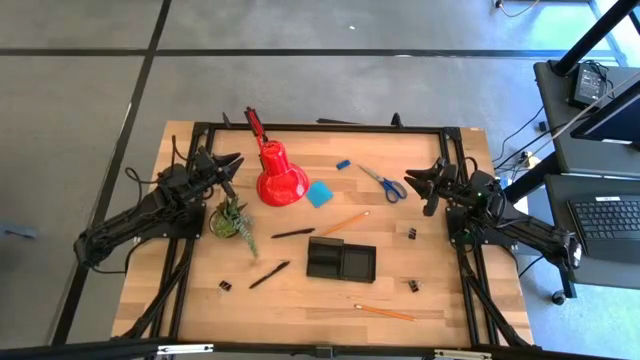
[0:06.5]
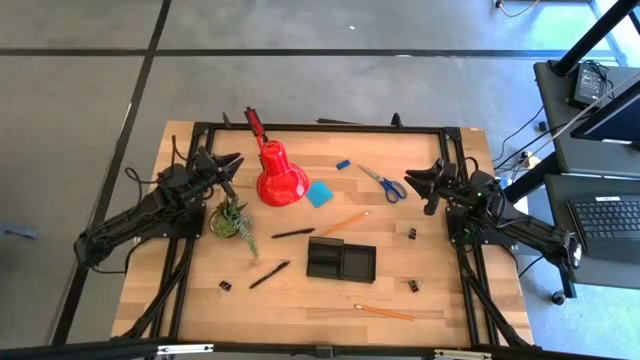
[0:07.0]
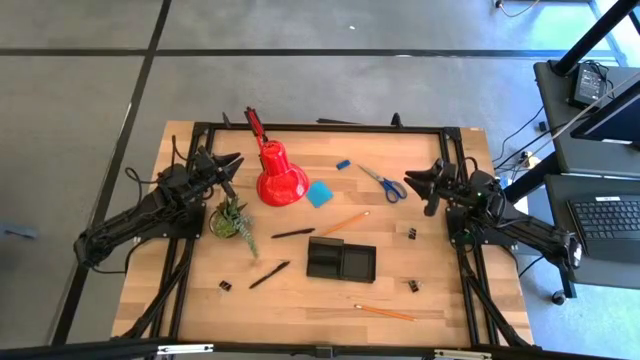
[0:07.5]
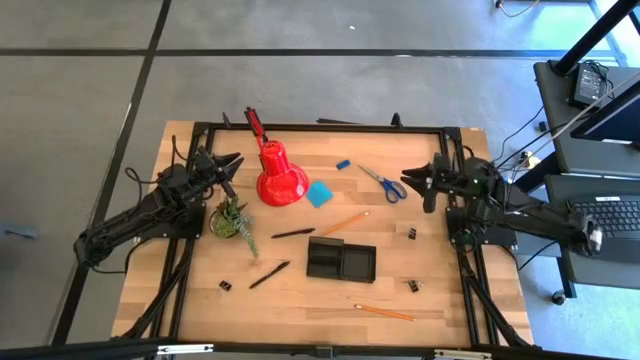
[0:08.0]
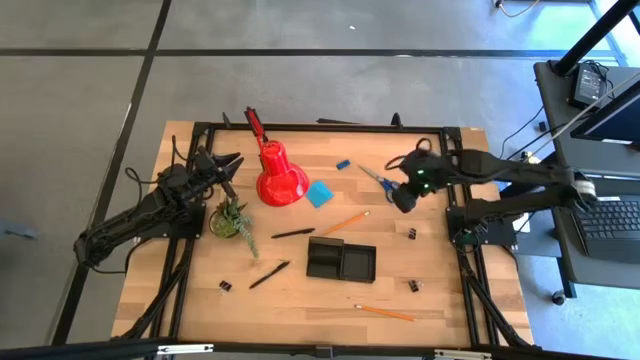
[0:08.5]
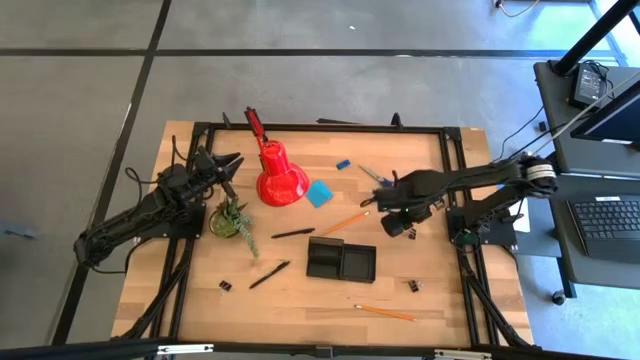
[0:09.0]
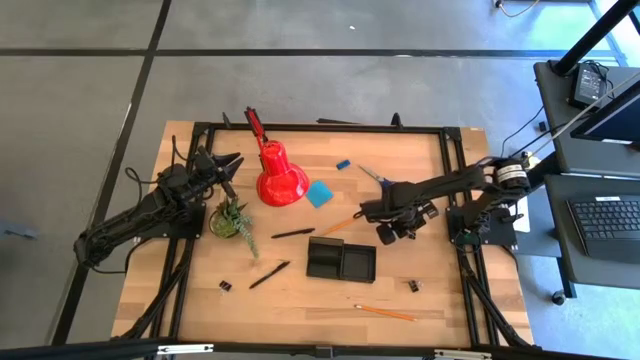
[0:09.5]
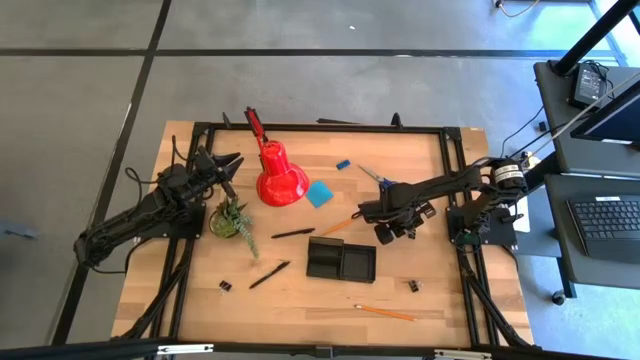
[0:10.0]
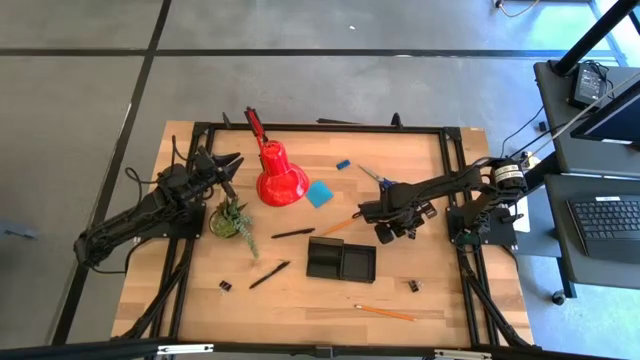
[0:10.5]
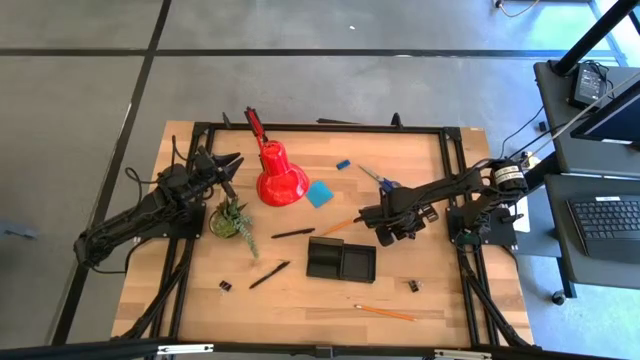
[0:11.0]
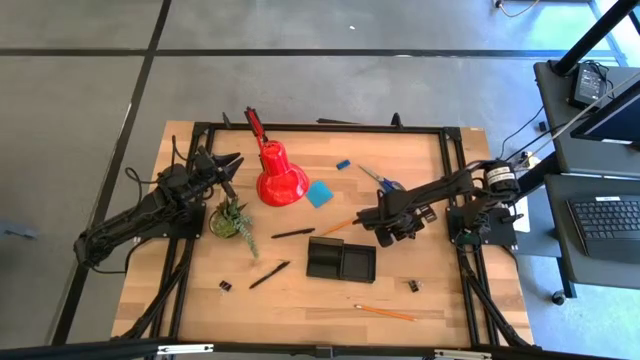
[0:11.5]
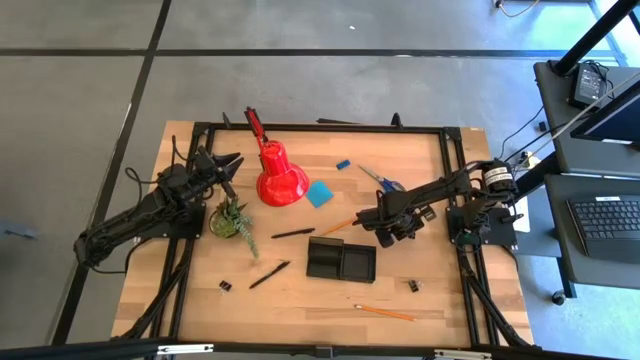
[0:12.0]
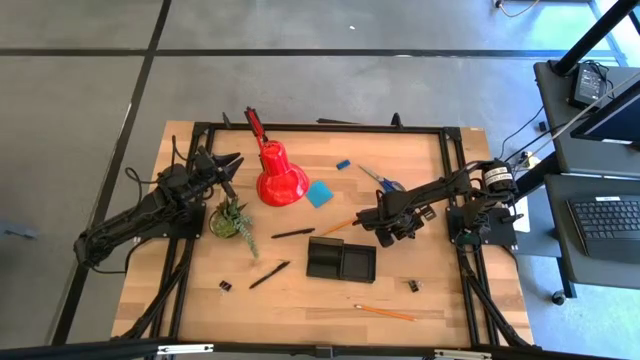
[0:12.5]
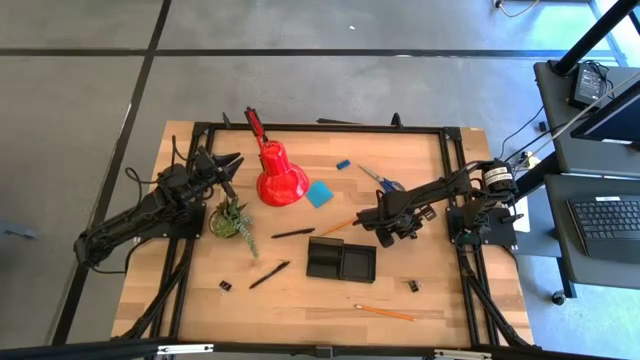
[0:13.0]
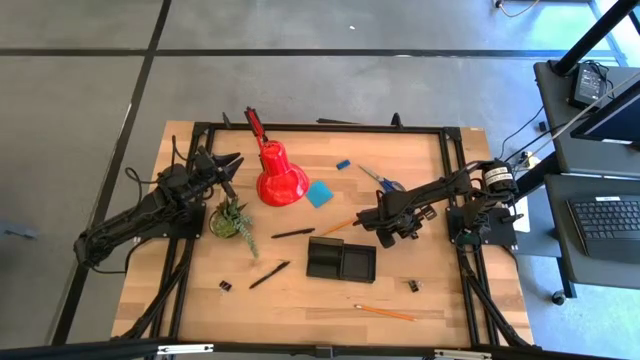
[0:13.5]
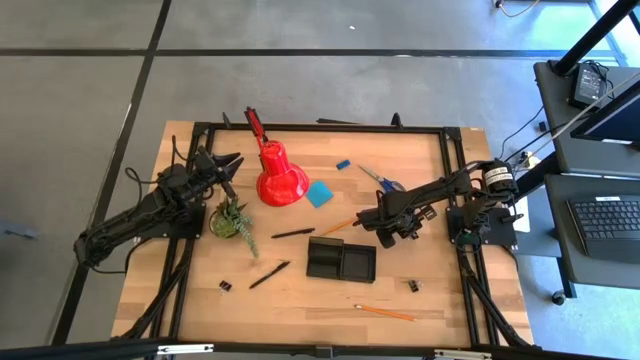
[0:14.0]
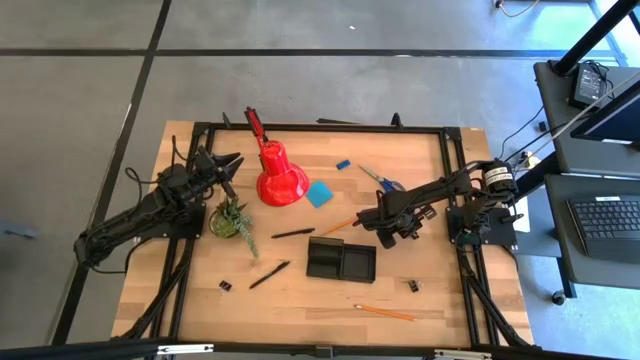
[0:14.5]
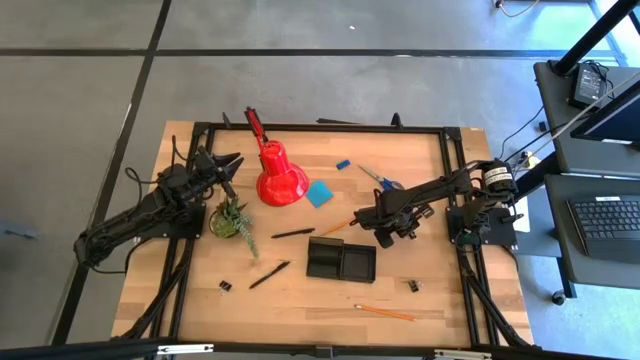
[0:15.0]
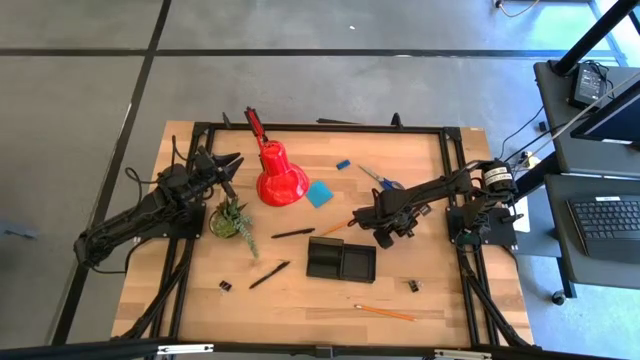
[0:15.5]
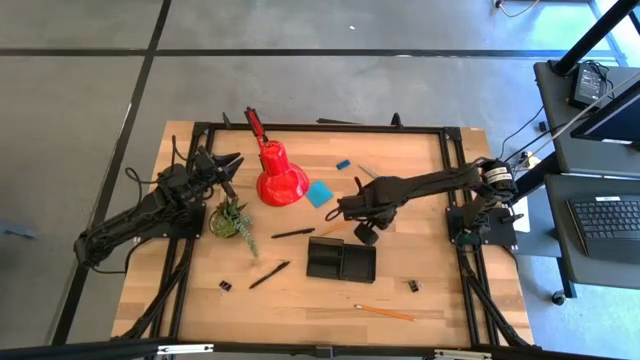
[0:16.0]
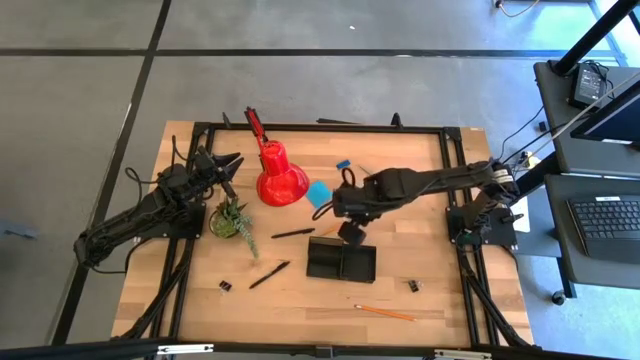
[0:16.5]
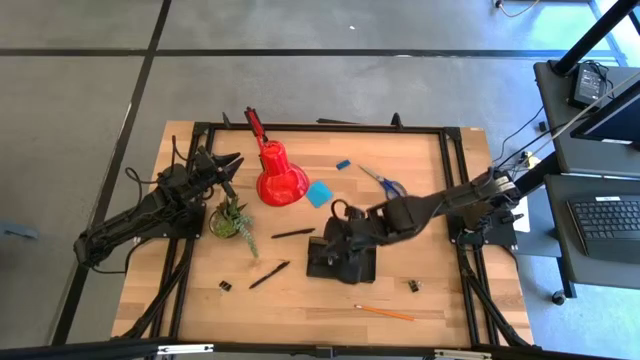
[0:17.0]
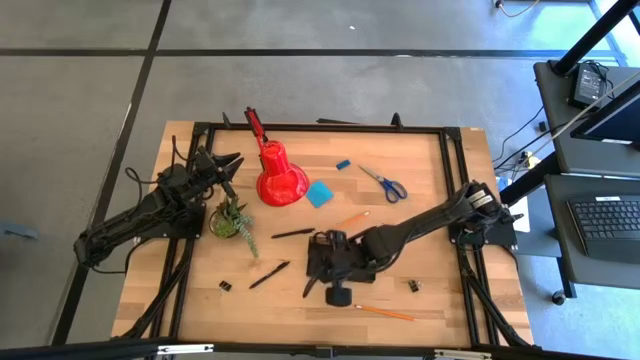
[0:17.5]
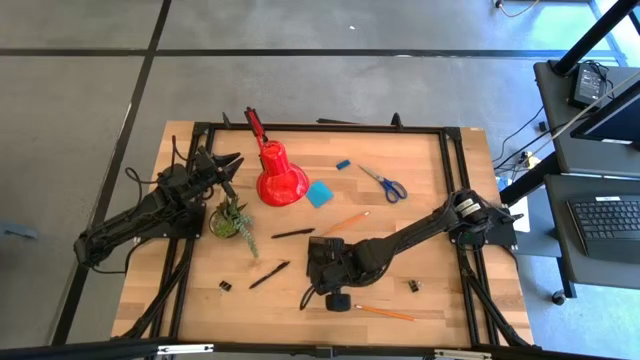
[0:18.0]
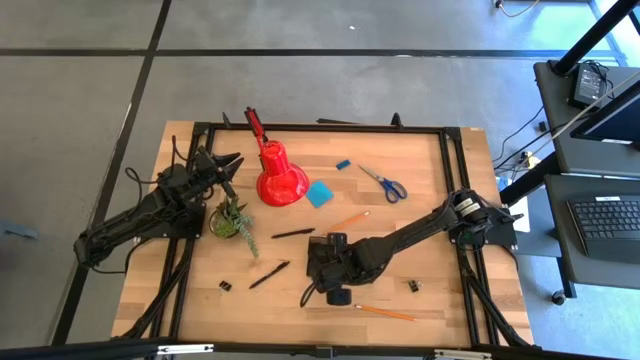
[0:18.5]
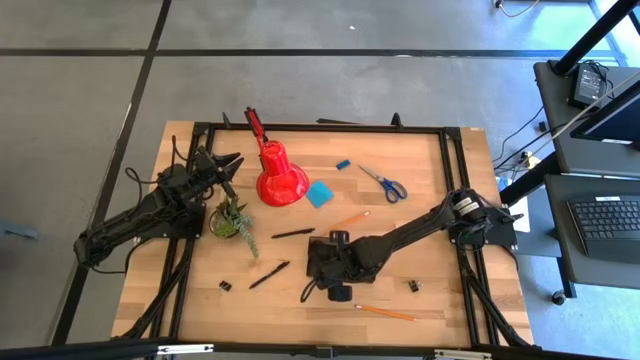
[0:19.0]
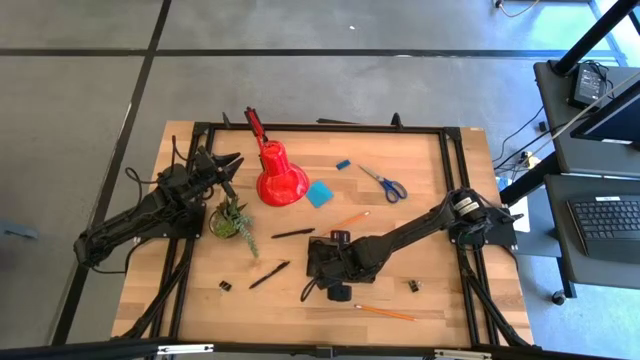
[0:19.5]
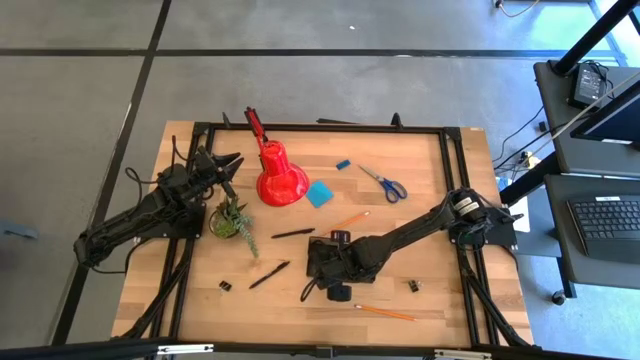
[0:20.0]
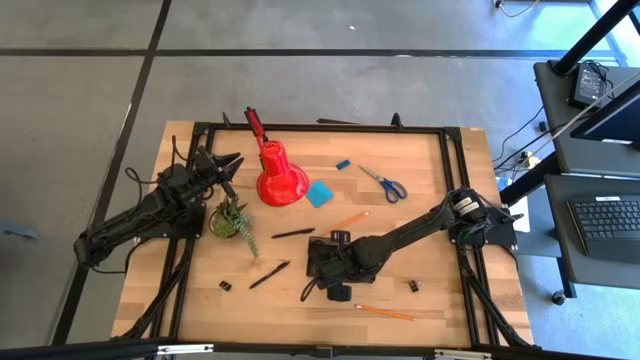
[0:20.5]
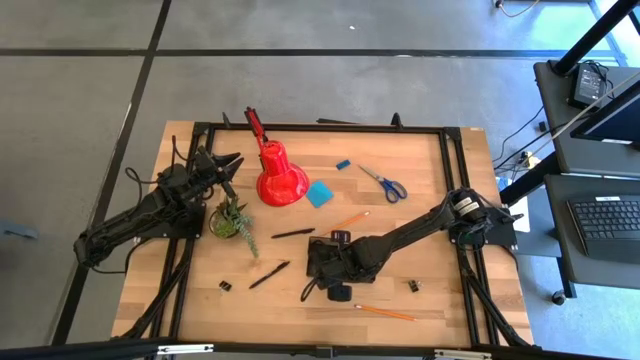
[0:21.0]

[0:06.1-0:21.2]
Task: Pick and place office supplies into organizer
Put the top black binder clip into the desk organizer

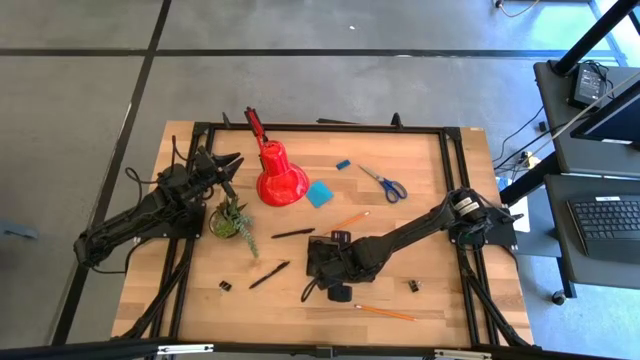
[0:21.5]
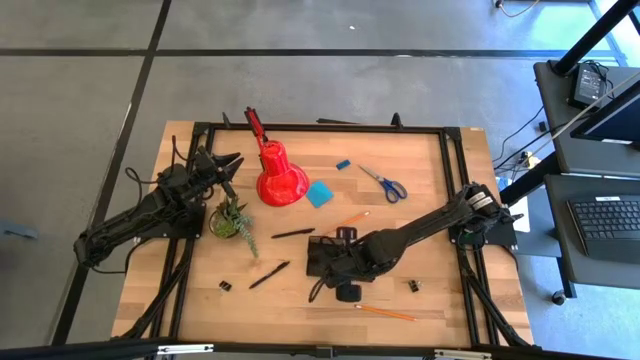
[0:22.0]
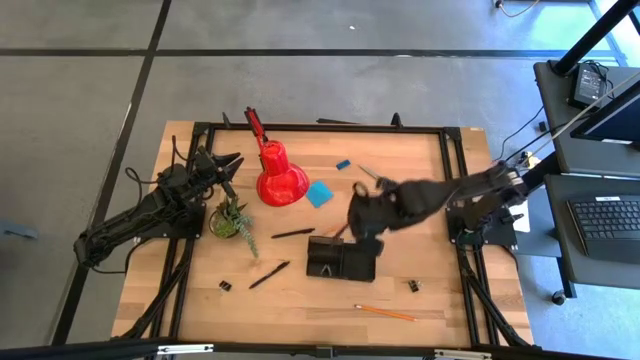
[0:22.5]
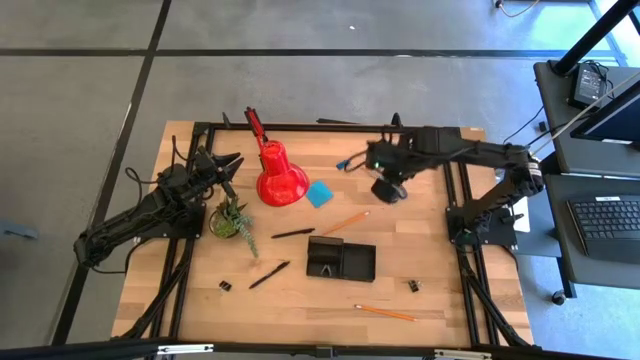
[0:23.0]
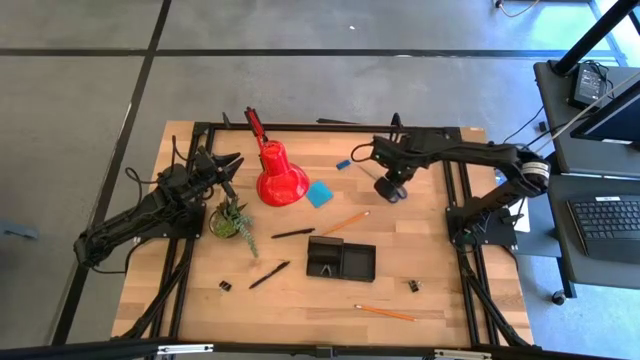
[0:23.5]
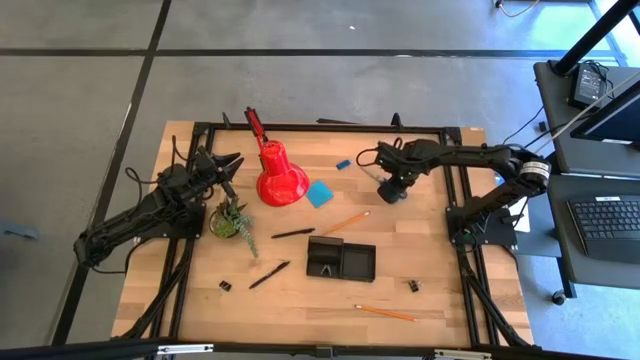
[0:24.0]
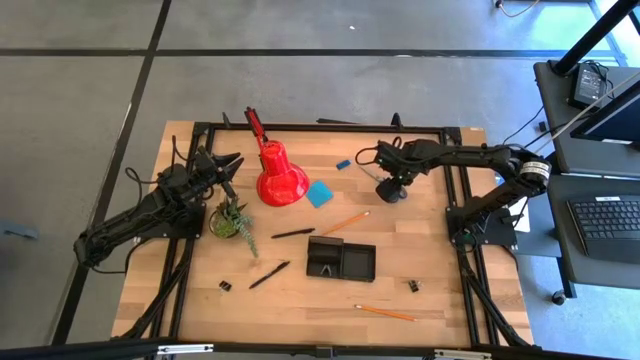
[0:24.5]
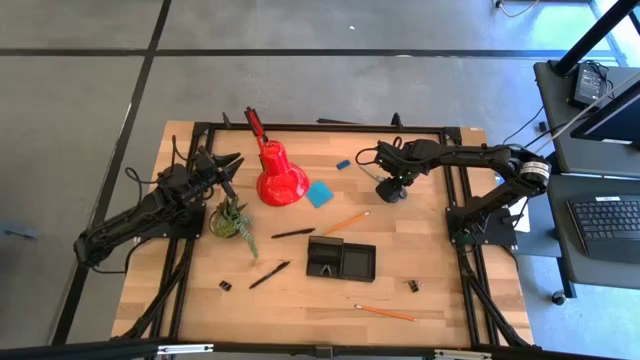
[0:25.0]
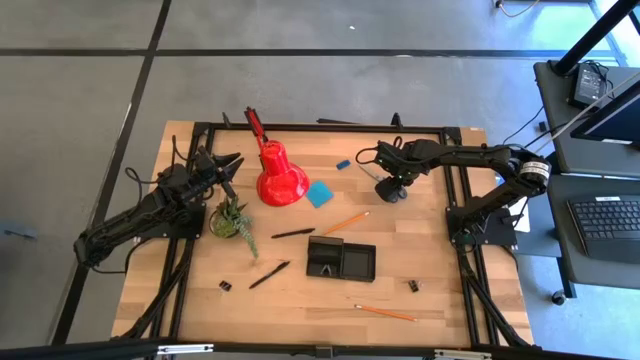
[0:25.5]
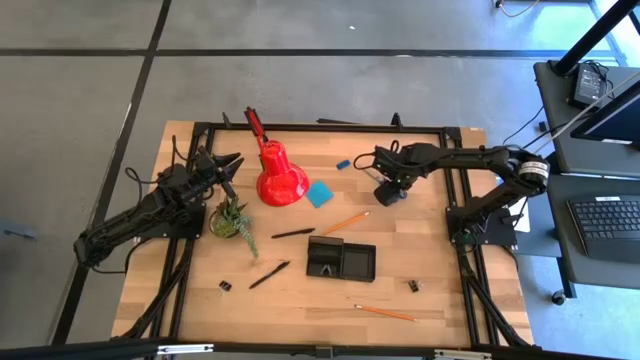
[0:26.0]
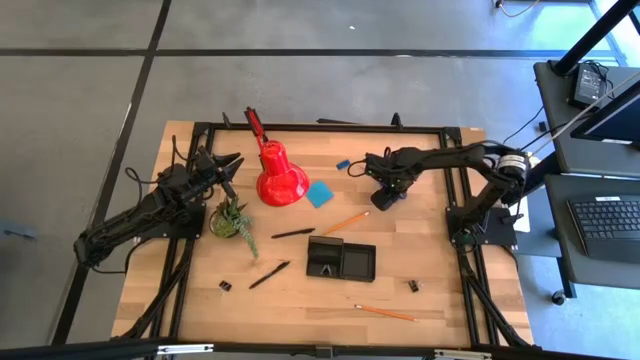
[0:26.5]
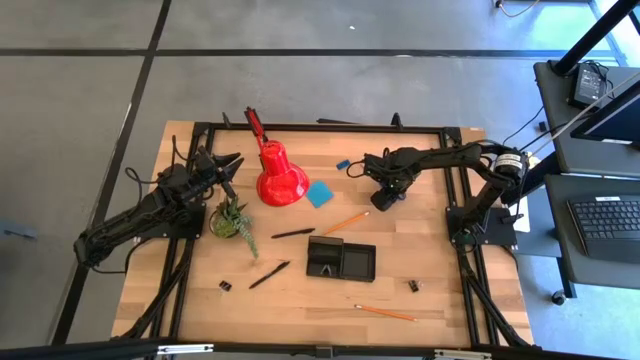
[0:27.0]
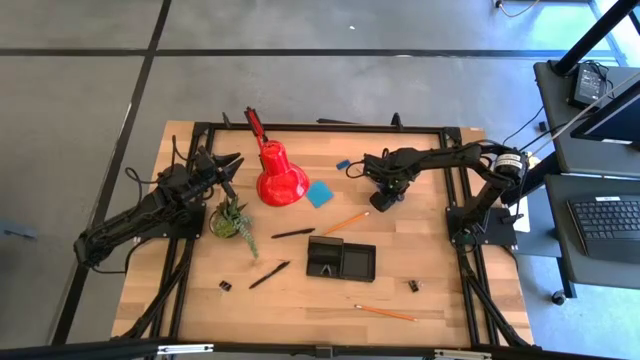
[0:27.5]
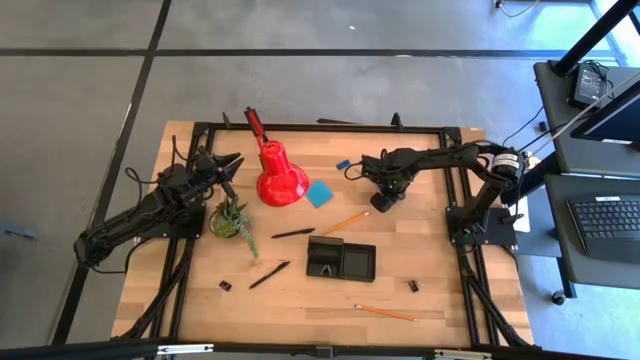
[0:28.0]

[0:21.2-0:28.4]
Put the blue scissors into the desk organizer
